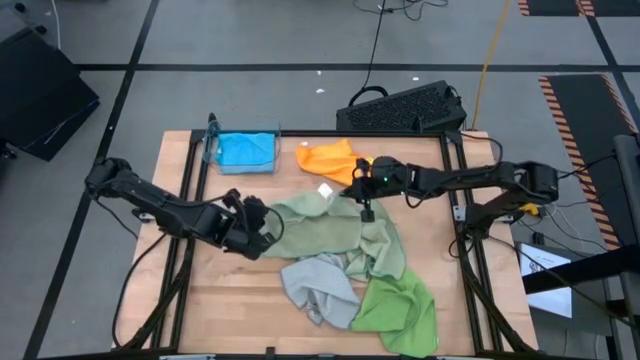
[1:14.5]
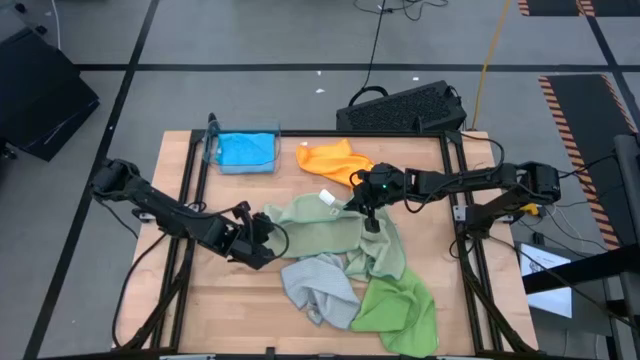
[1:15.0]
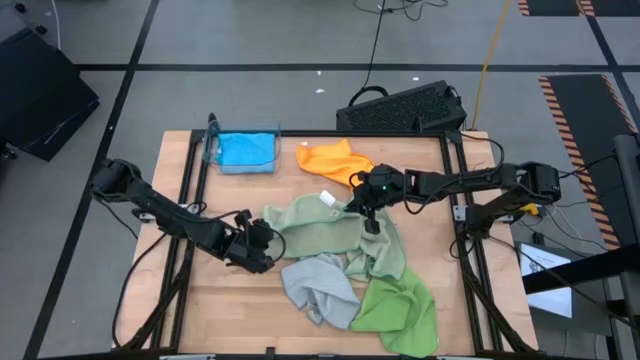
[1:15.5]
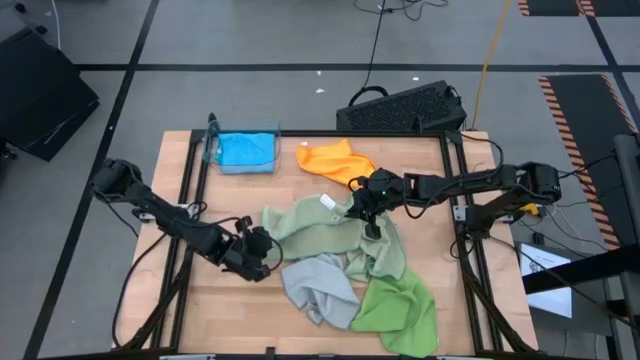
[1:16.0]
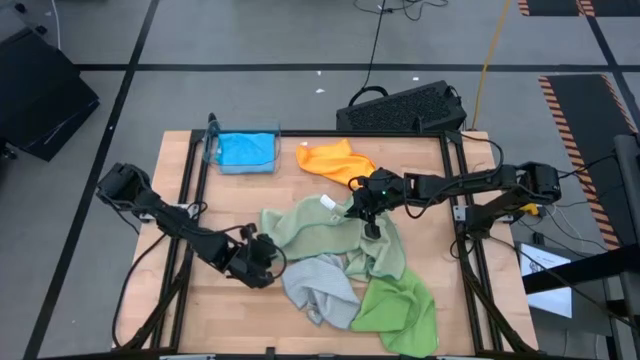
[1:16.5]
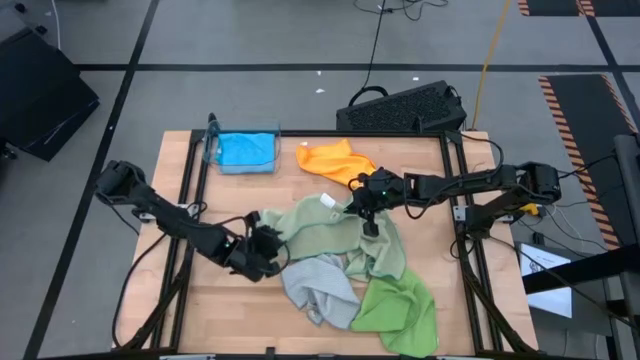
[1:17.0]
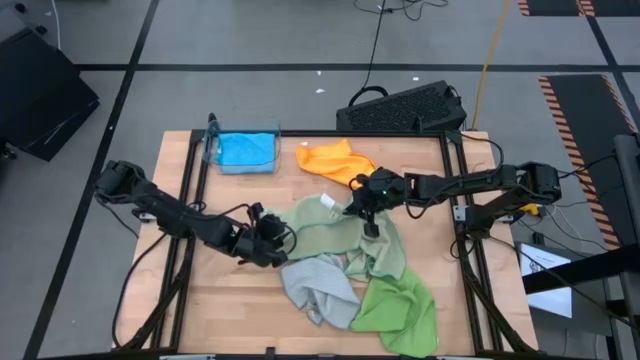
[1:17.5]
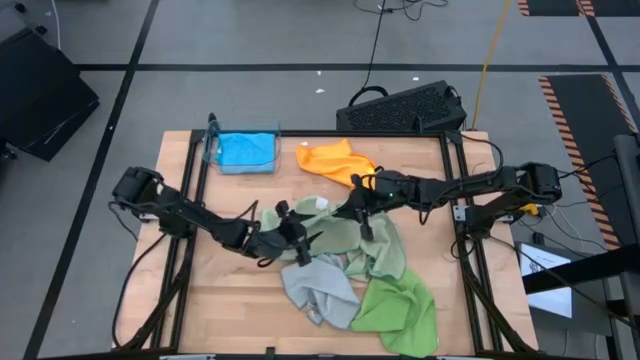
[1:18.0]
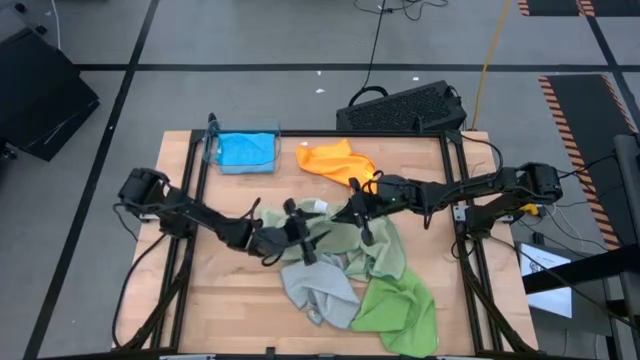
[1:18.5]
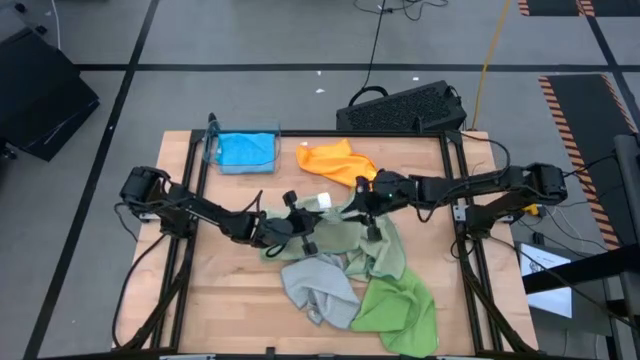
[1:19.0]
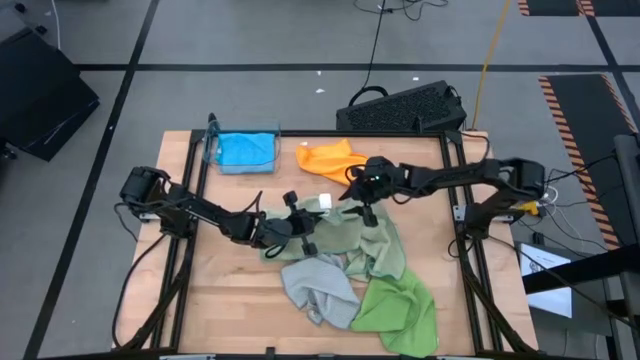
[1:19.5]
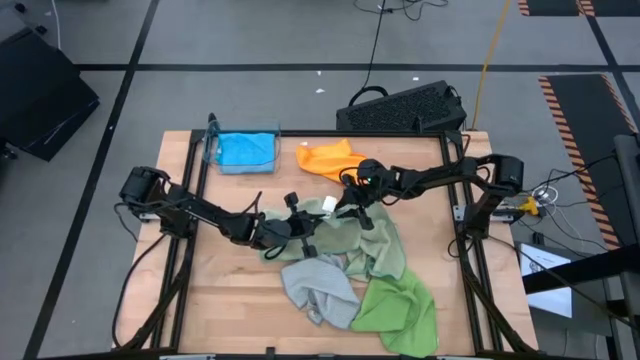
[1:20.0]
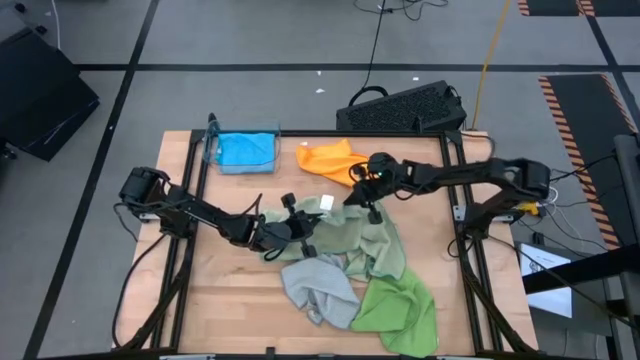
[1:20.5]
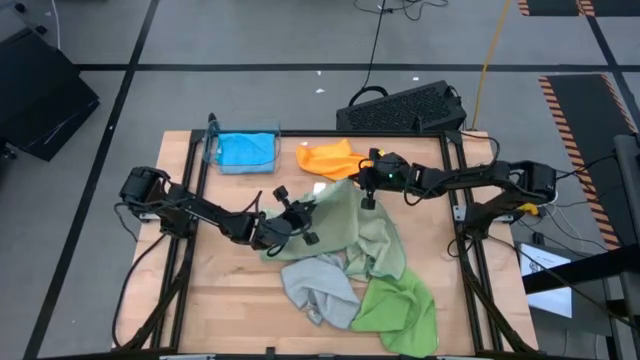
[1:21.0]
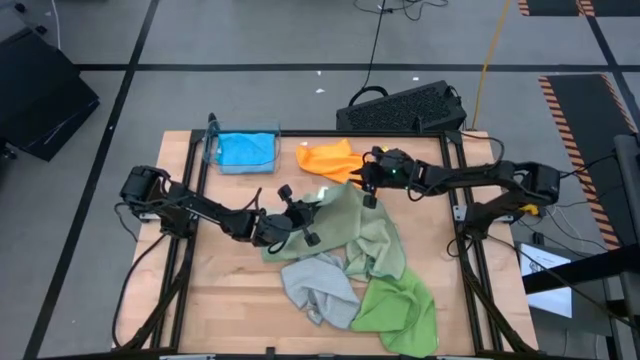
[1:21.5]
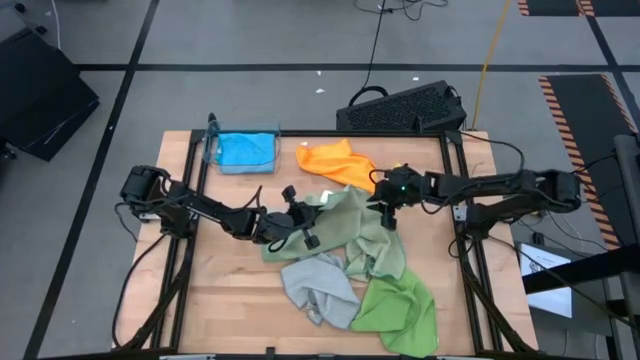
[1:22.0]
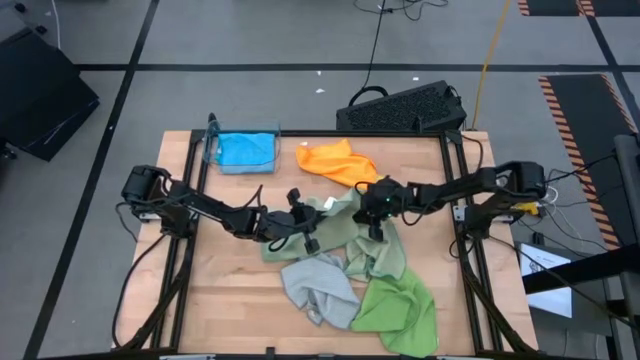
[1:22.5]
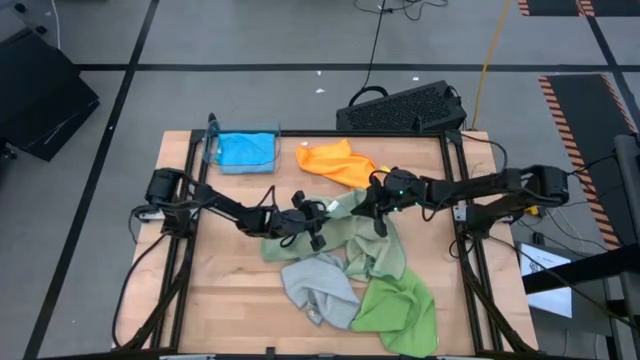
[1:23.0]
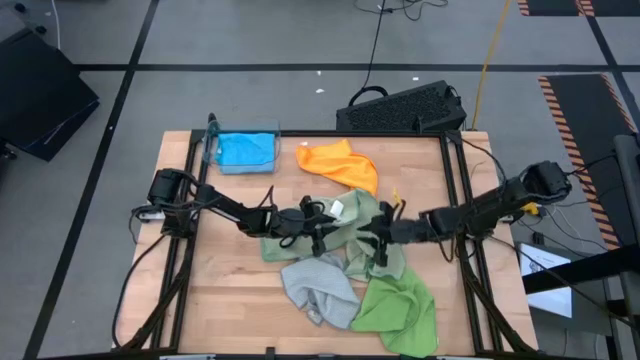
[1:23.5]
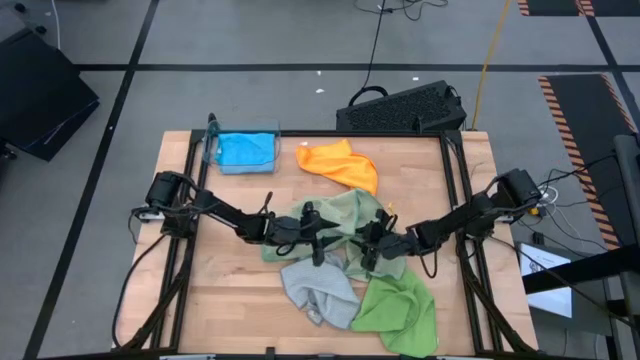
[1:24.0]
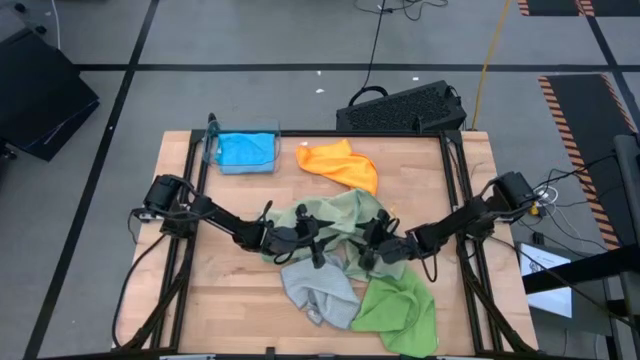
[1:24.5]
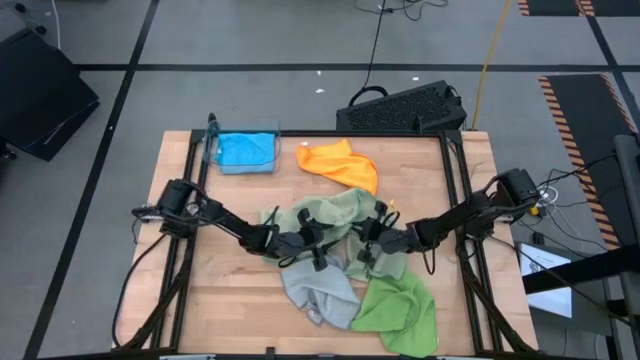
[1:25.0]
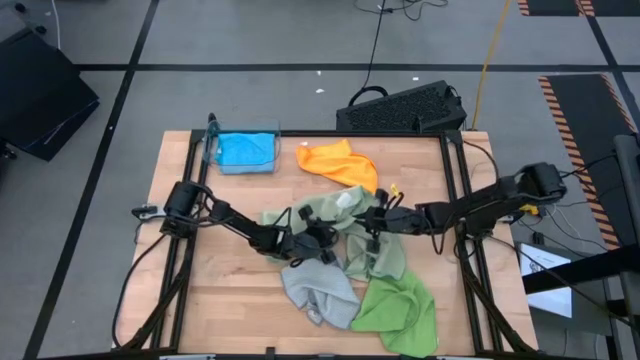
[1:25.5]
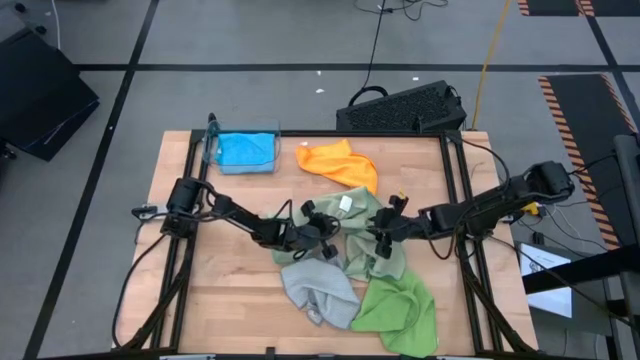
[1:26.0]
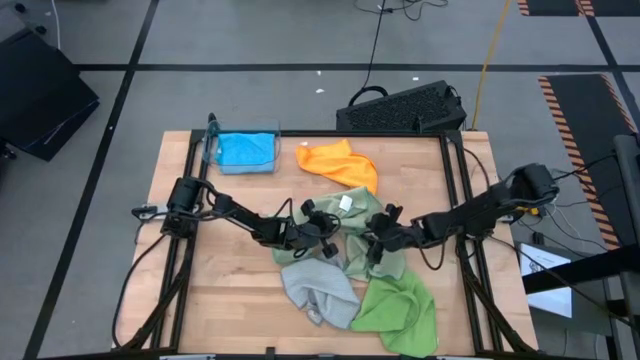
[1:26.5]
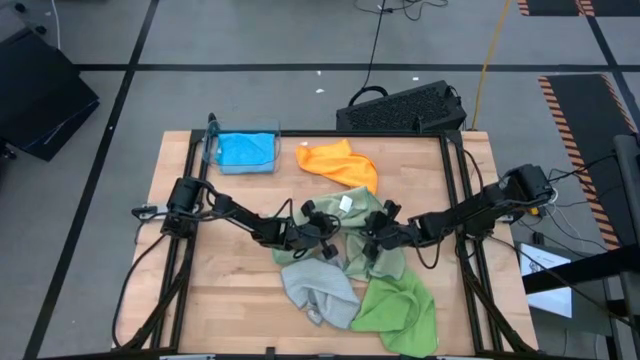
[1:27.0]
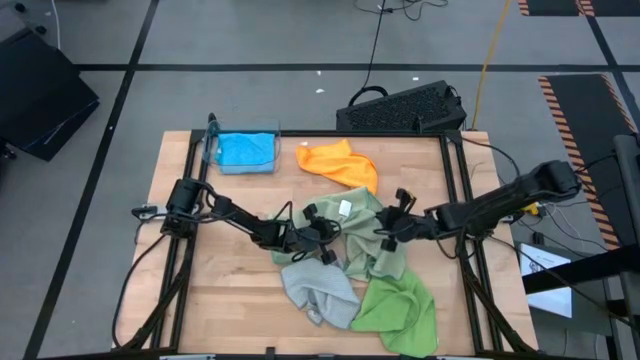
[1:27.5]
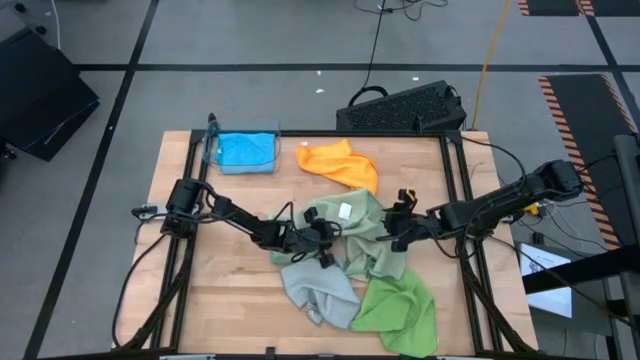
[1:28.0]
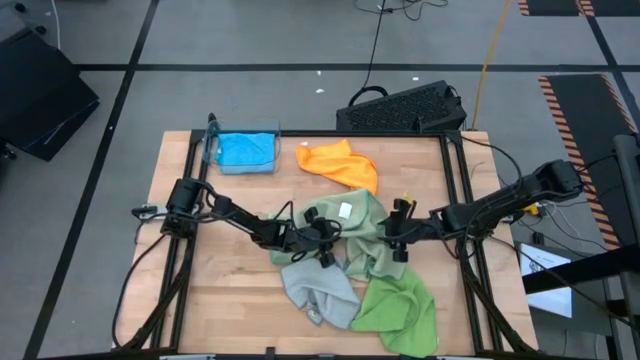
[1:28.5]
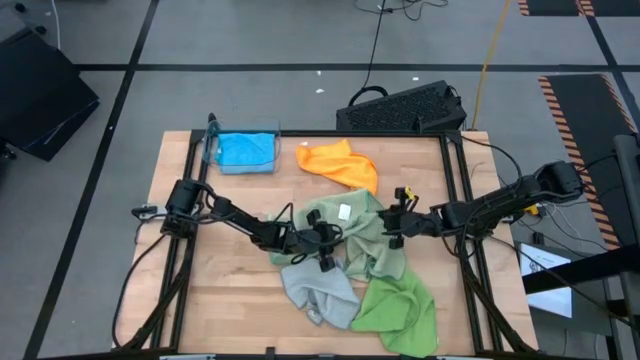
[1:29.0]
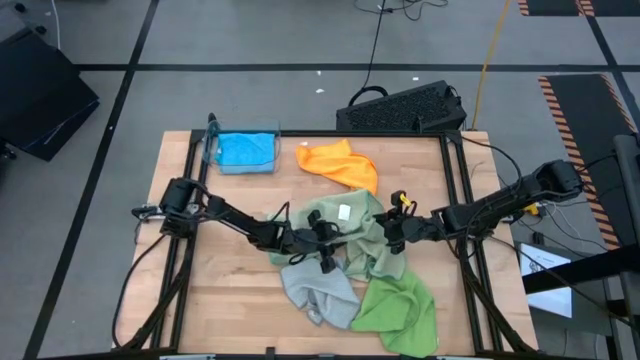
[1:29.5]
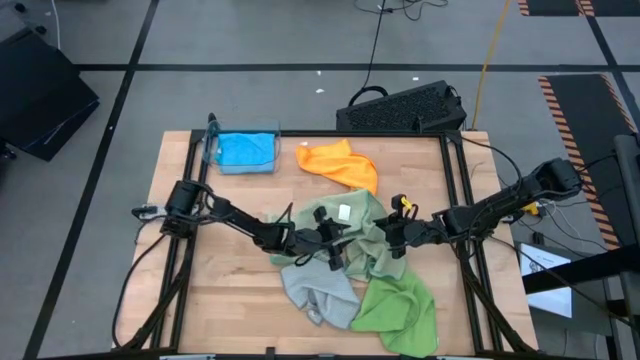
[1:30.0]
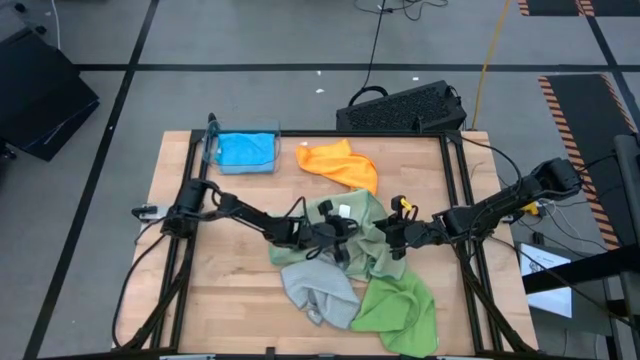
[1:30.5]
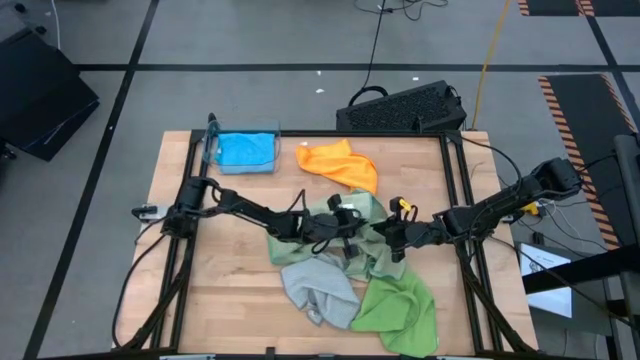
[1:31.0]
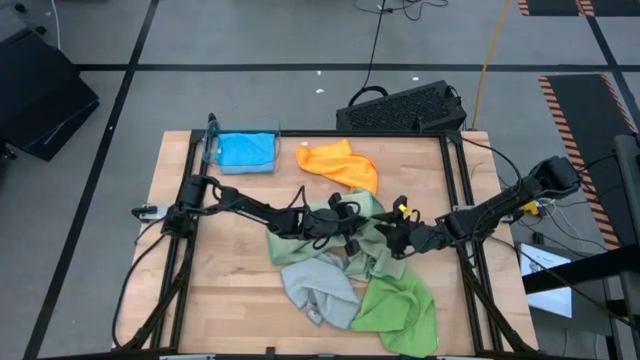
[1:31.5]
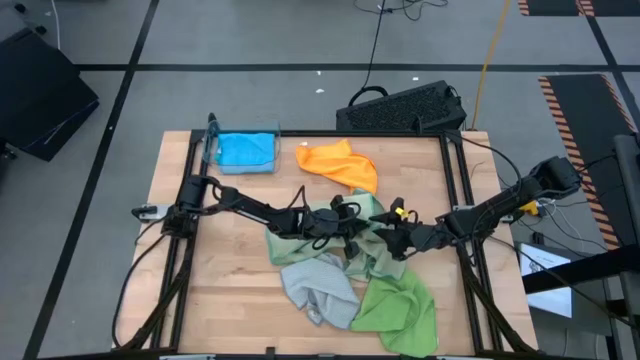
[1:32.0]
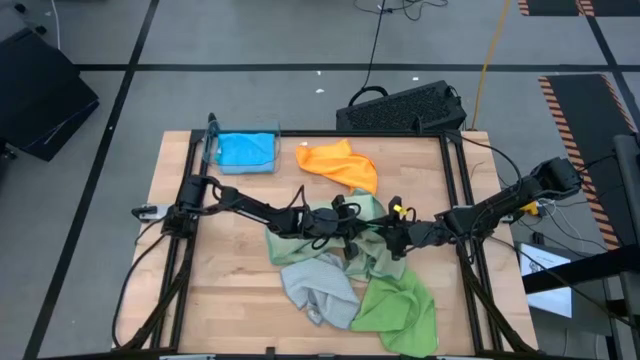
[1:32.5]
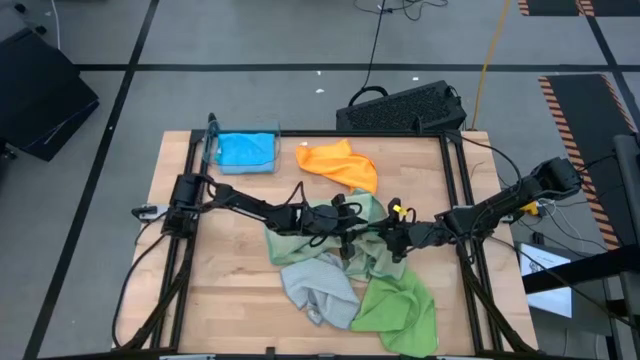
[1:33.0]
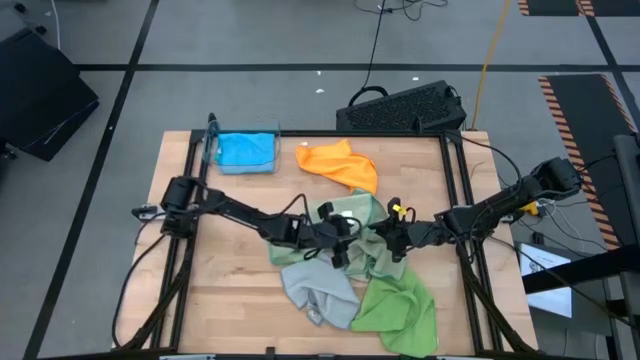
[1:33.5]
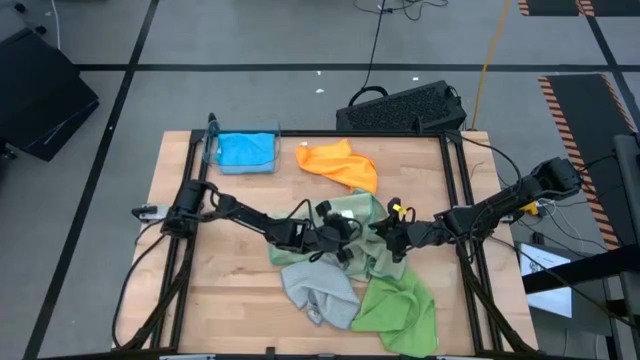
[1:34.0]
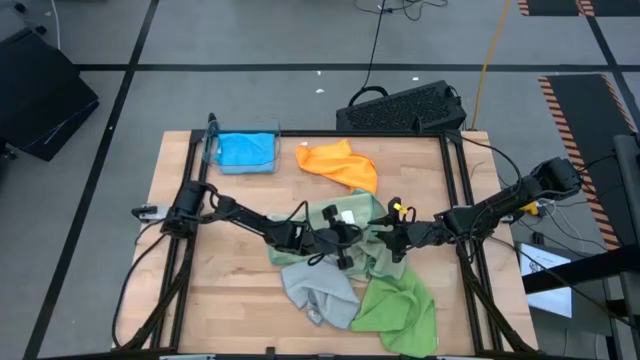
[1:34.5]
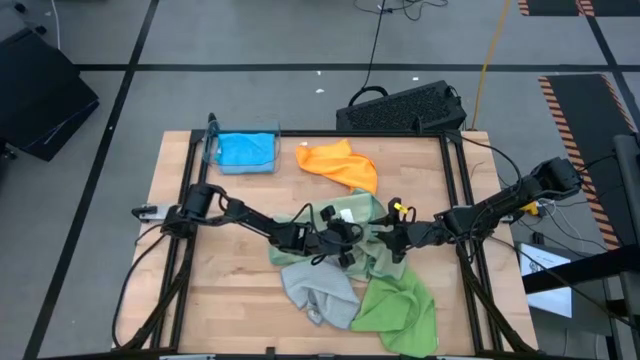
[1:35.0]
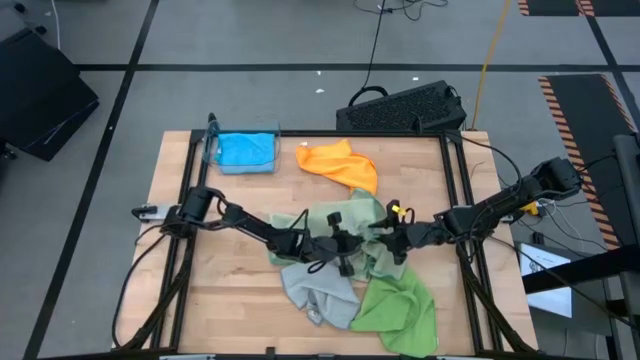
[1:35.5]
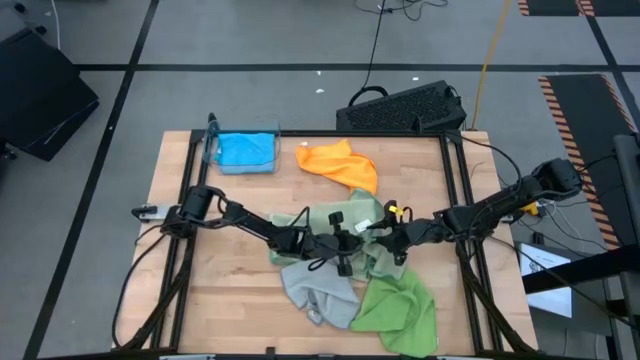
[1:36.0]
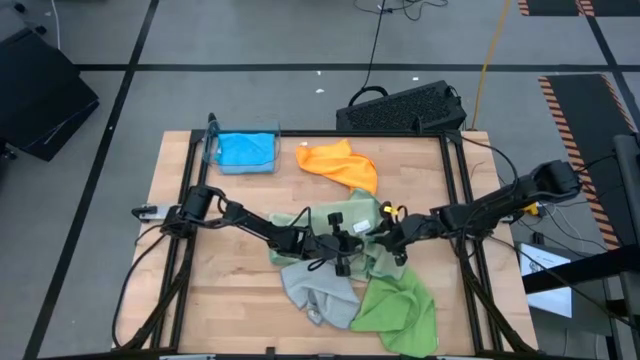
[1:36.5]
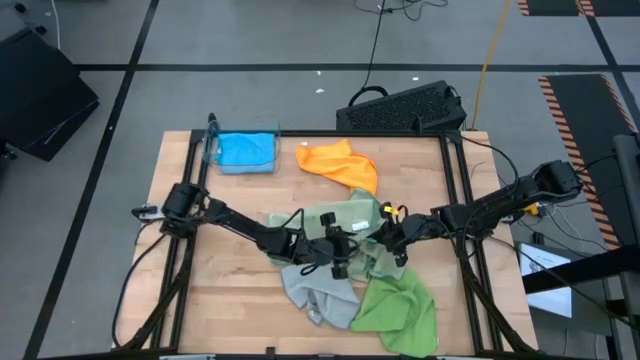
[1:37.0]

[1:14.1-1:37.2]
Task: Fold microfiber towels
Fold the left light green microfiber cloth
